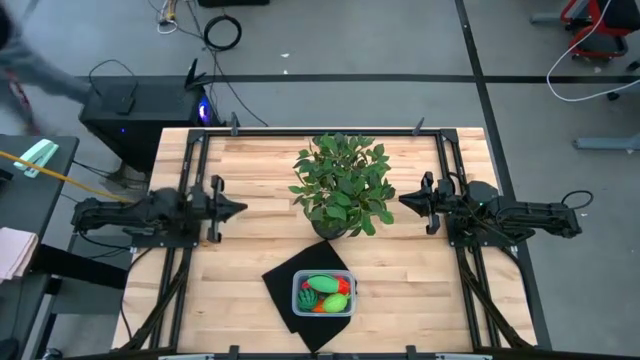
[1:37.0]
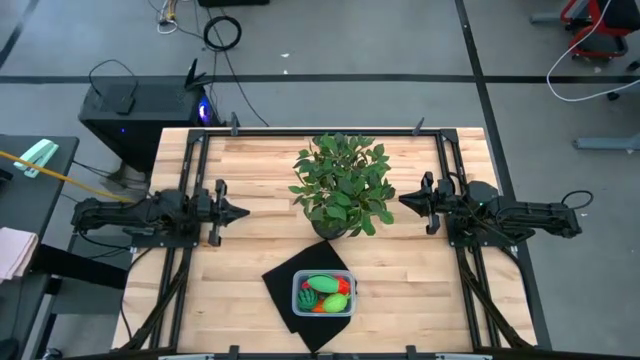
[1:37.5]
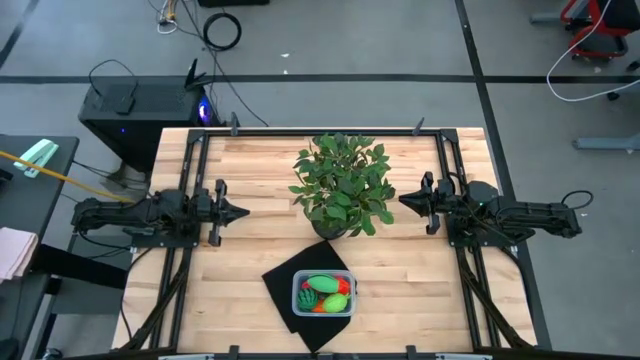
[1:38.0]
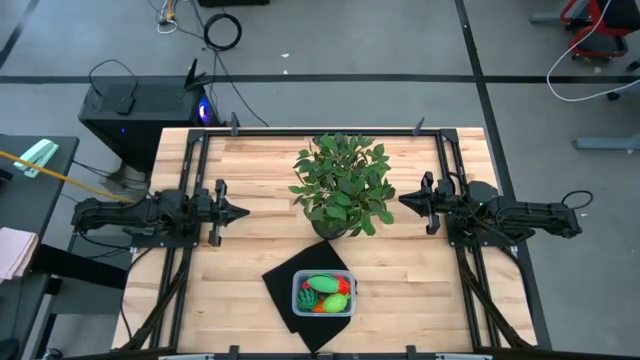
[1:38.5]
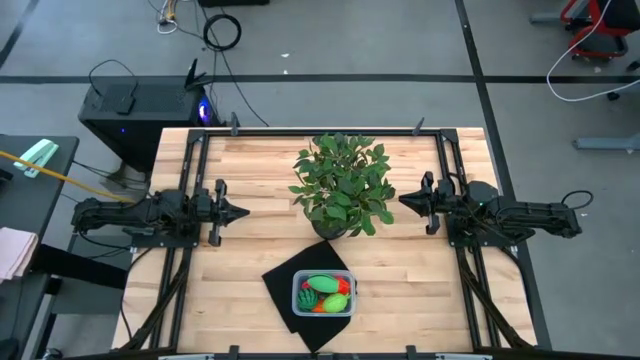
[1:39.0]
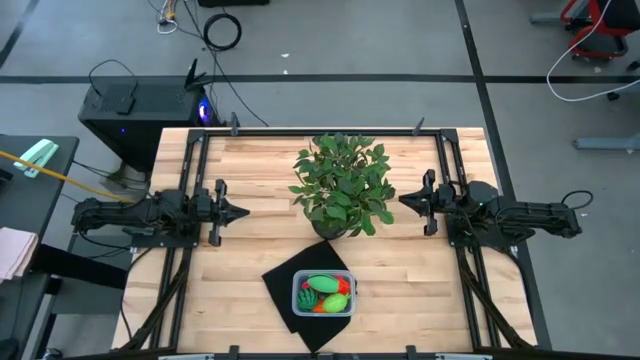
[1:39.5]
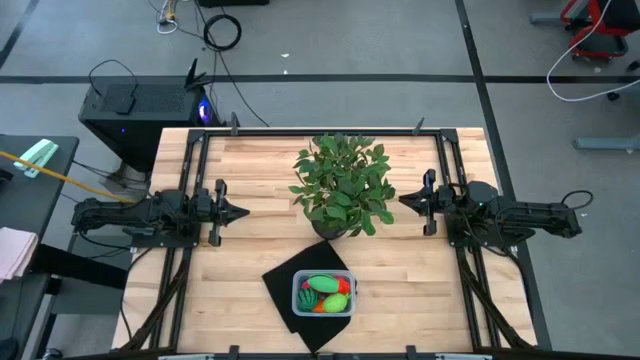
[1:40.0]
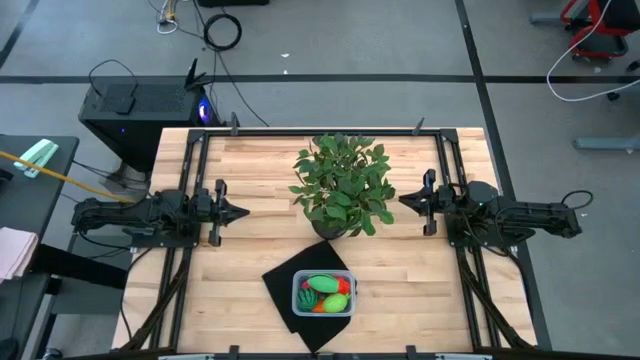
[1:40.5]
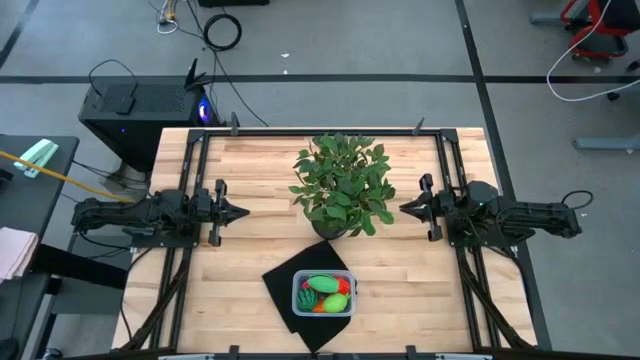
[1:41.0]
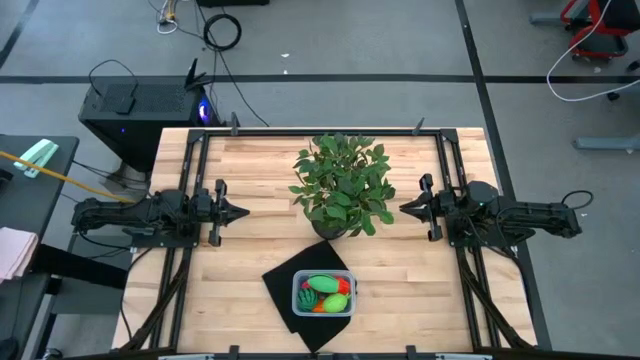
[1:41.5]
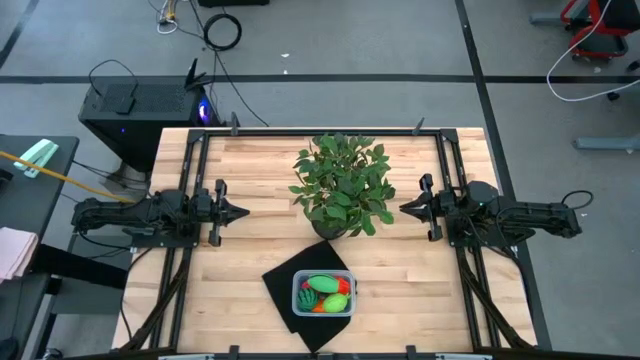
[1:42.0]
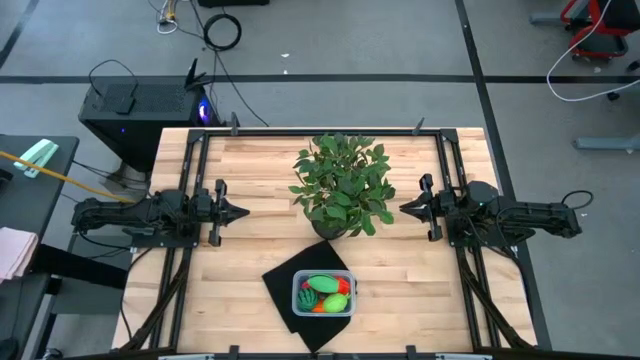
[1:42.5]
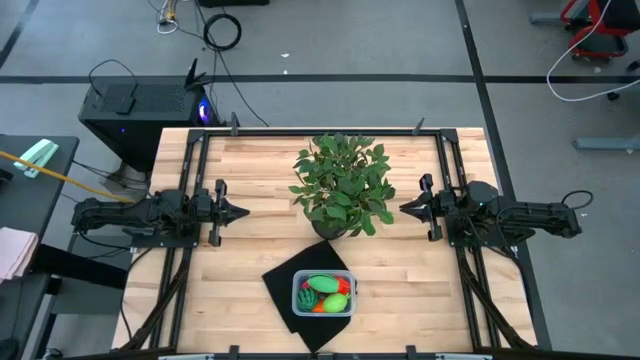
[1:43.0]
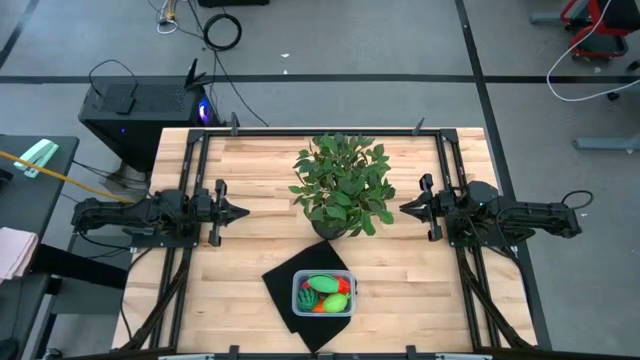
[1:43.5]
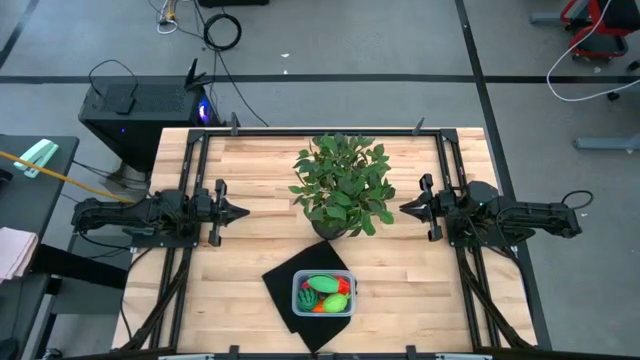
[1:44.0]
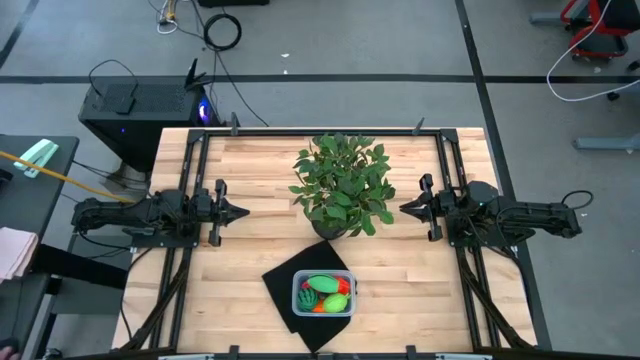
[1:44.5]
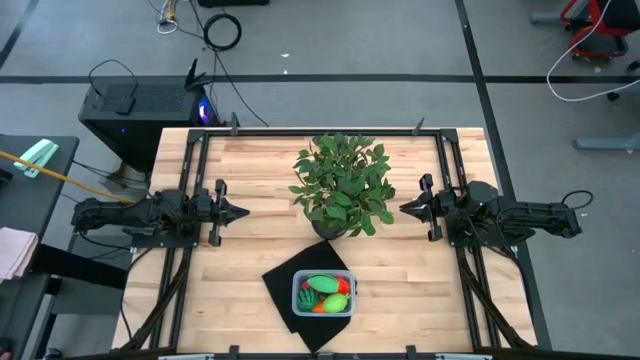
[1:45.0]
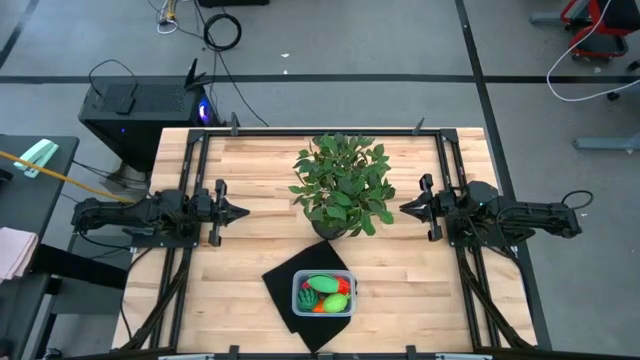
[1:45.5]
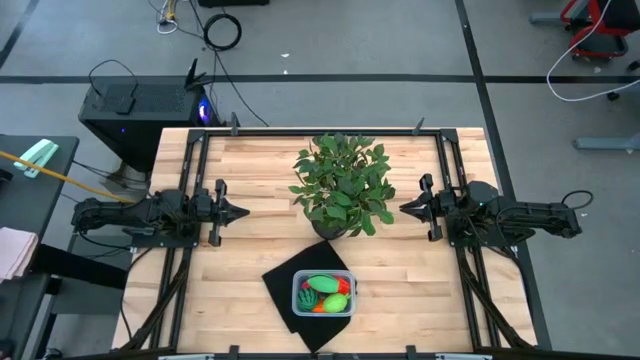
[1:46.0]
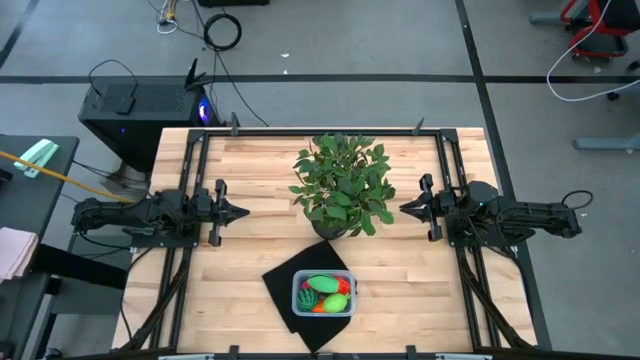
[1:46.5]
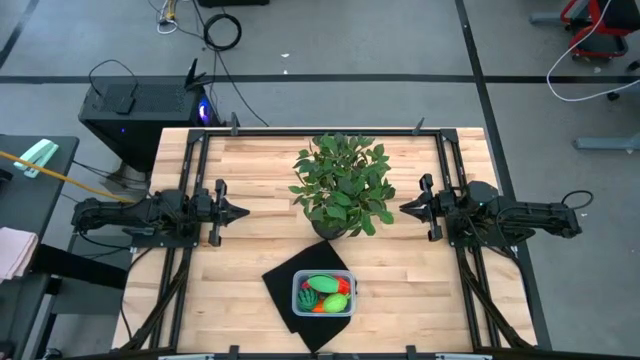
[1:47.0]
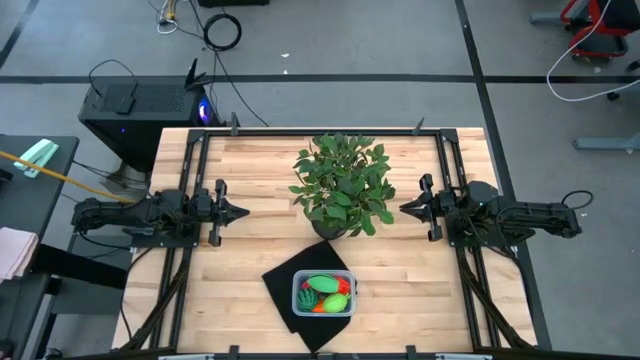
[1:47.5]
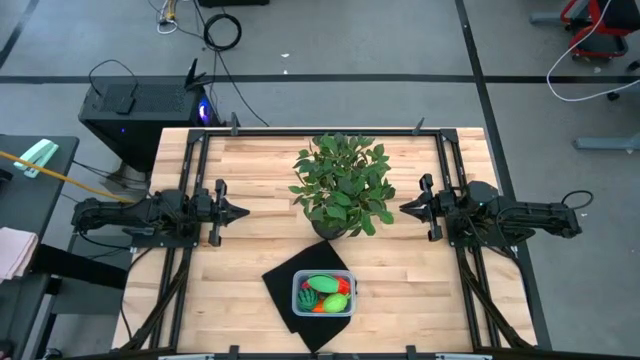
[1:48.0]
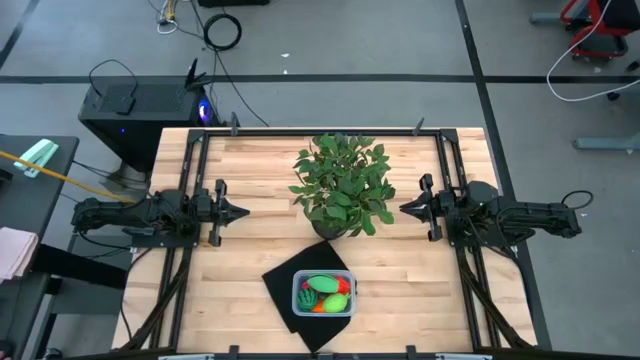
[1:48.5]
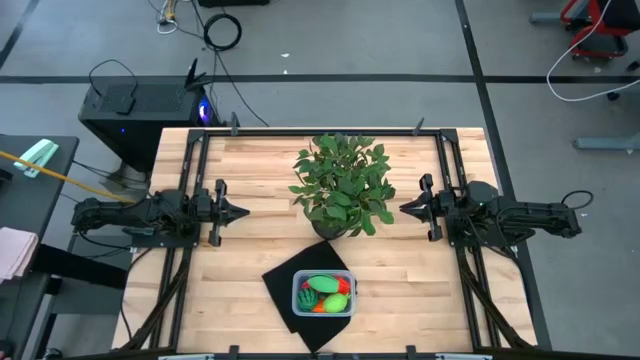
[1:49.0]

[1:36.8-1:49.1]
Task: Pick and placing Produce into tupperware
Return to Home Position

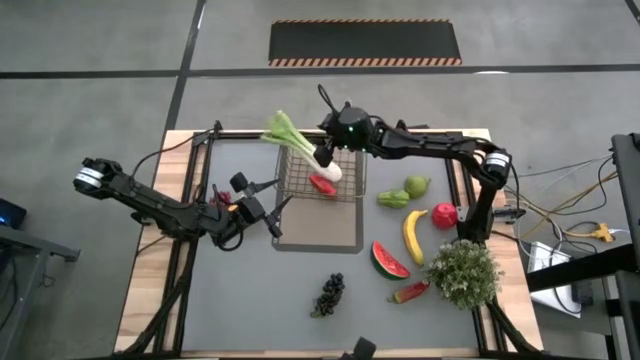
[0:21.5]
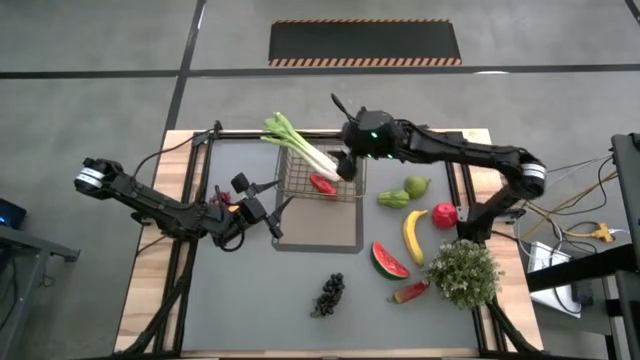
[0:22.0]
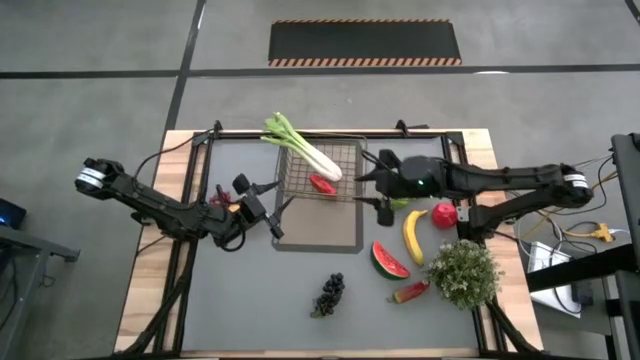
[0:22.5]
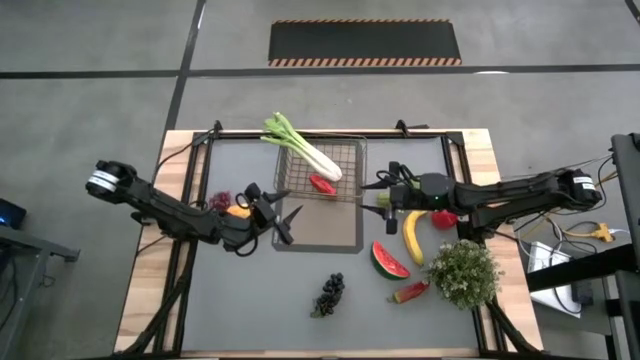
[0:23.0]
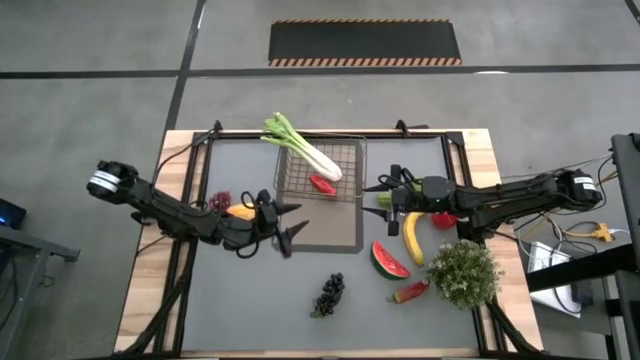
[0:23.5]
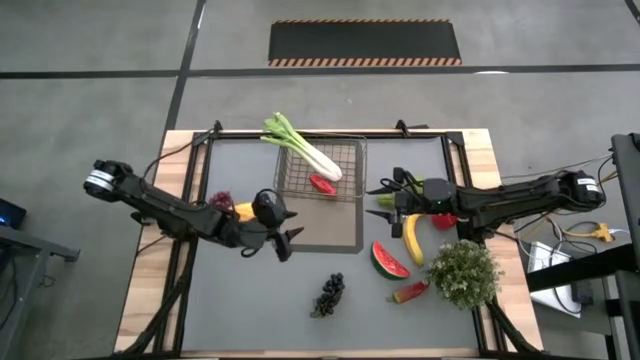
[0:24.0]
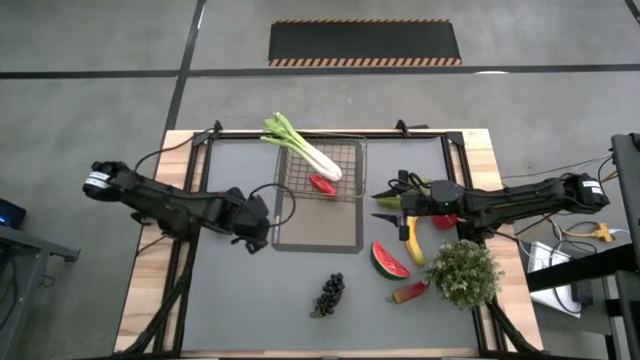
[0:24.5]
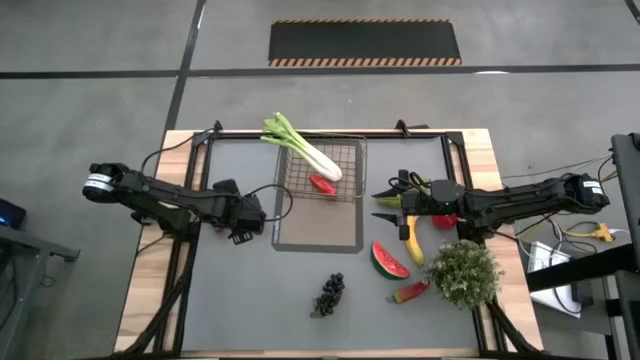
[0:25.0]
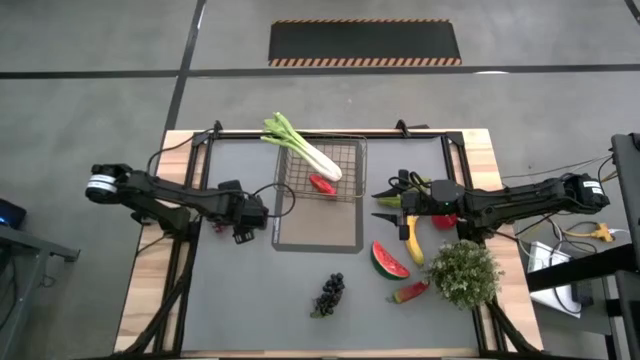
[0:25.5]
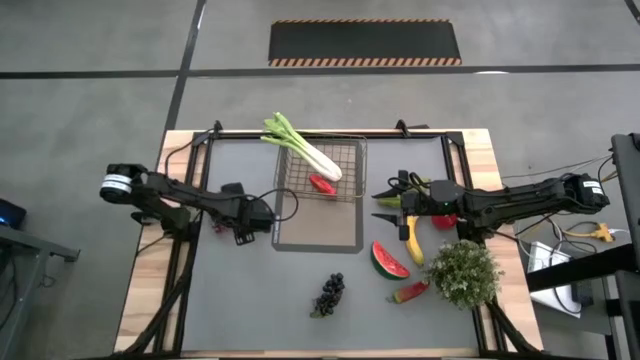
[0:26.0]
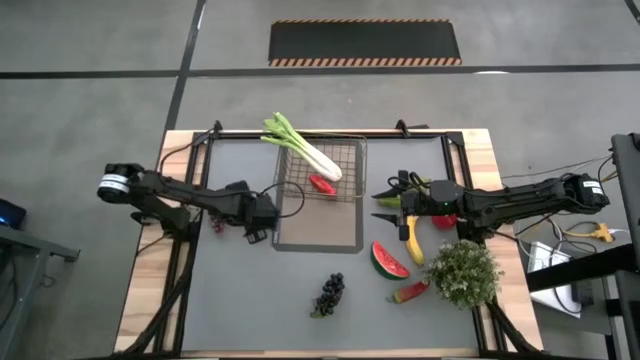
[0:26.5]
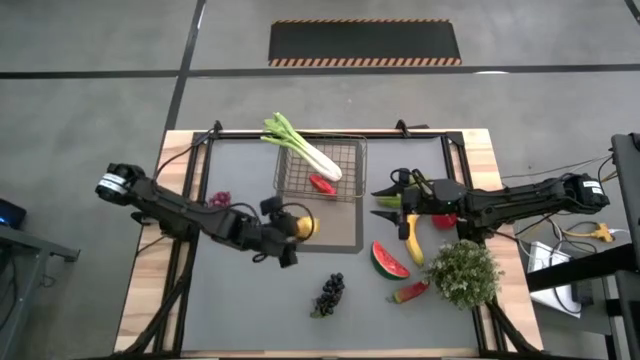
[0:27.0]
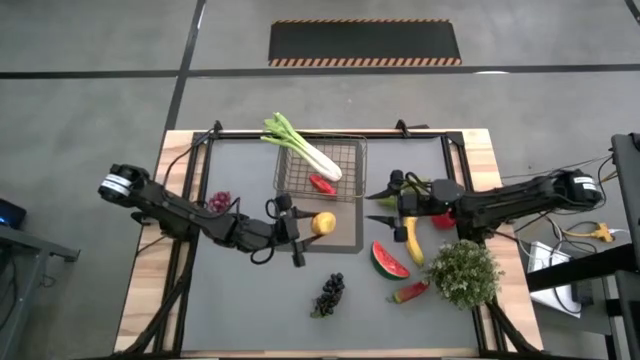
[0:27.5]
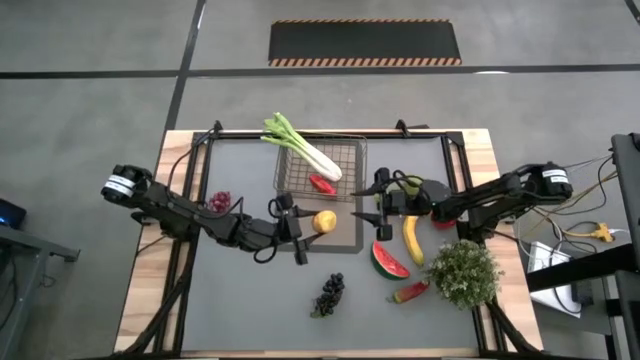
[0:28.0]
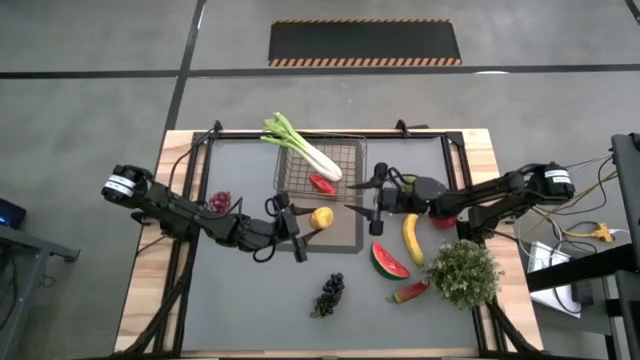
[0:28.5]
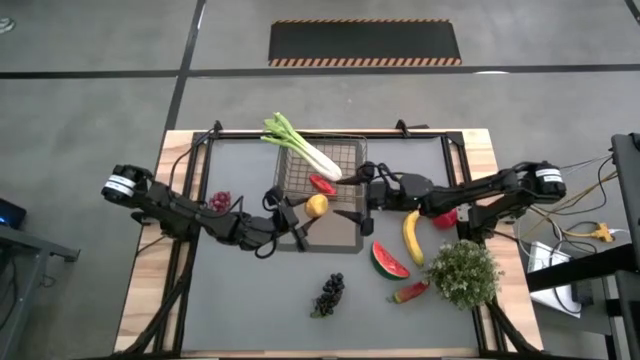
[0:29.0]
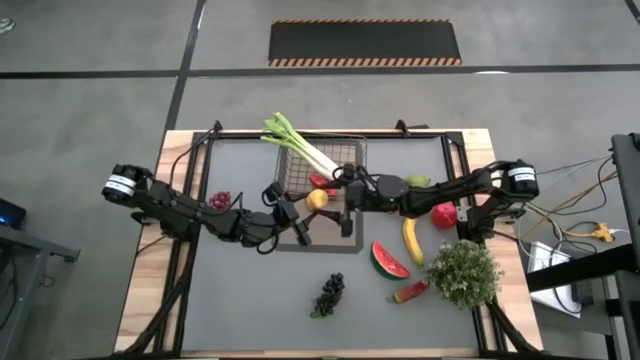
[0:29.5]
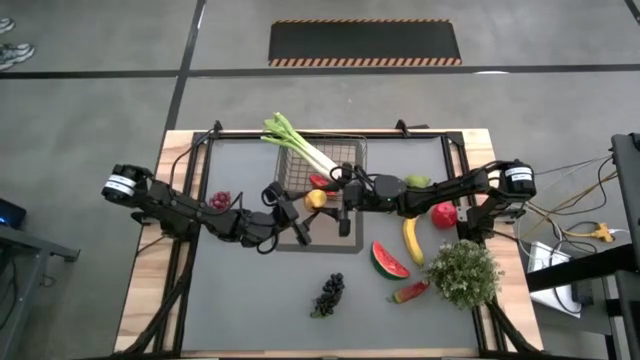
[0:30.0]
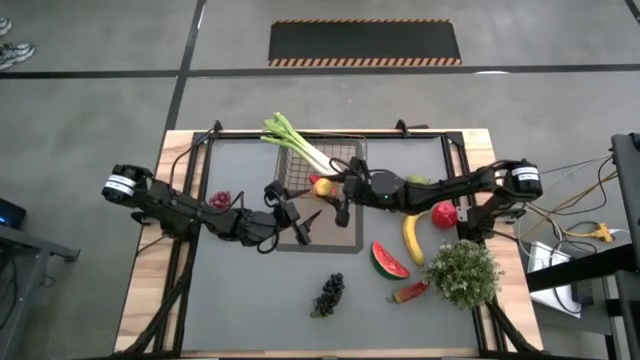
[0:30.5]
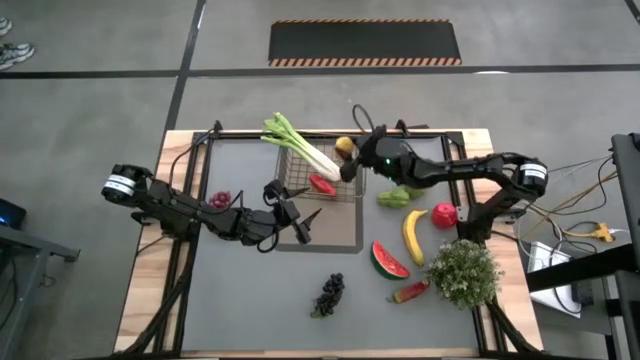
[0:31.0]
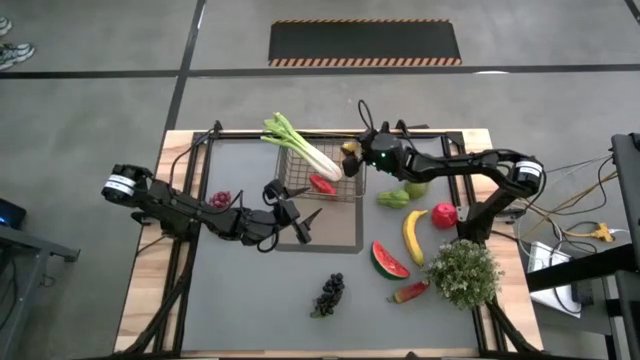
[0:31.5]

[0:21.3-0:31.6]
Task: Build produce basket
Put the mango into the wire basket
